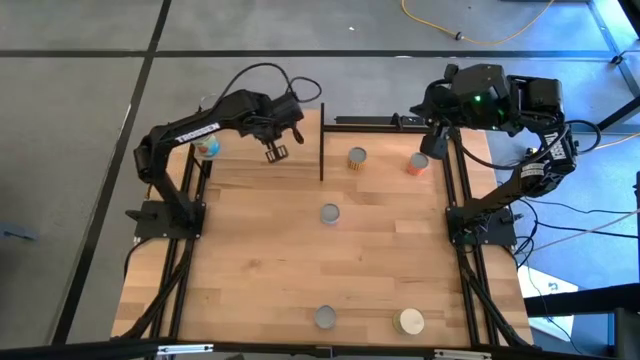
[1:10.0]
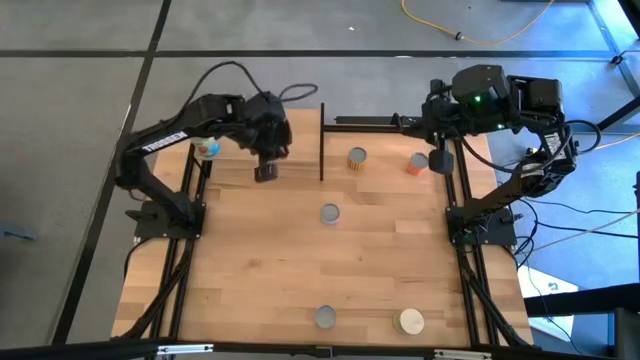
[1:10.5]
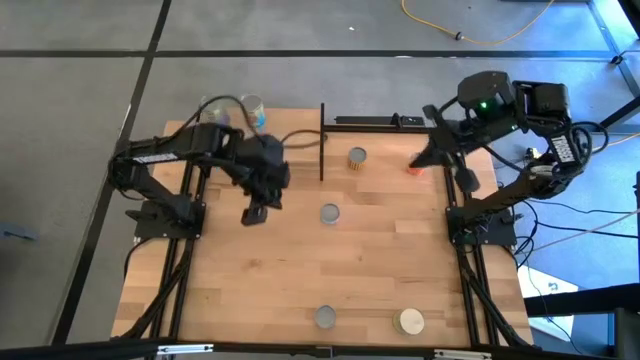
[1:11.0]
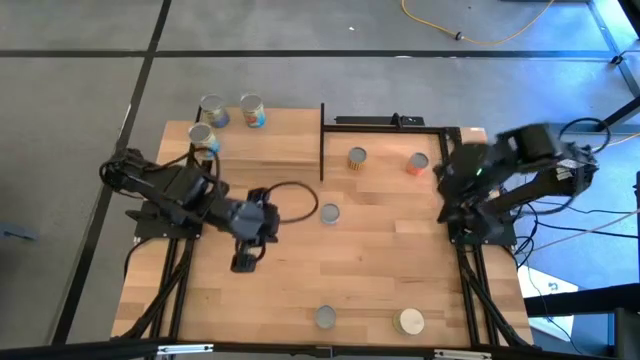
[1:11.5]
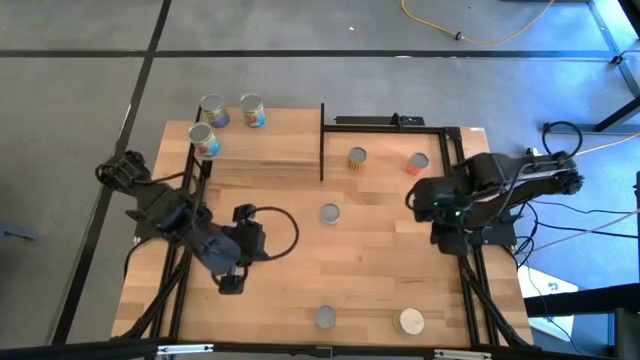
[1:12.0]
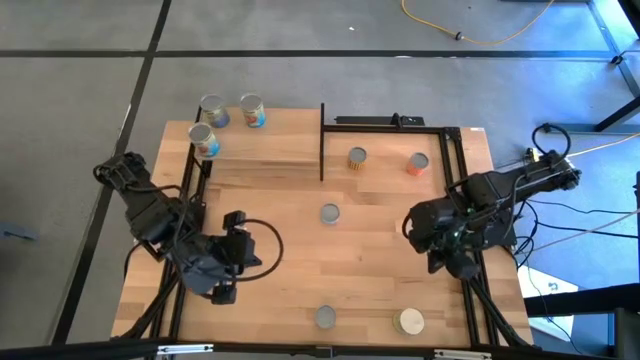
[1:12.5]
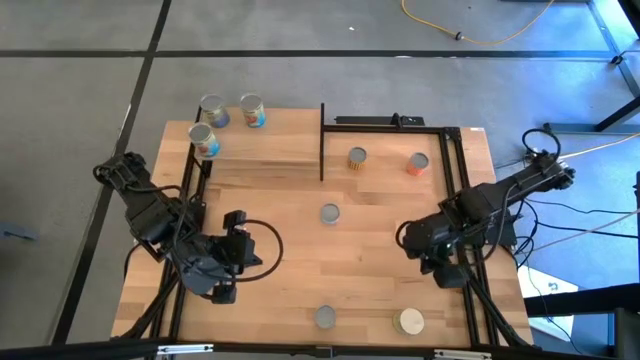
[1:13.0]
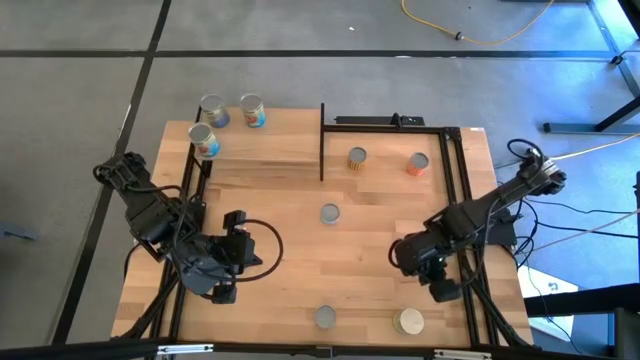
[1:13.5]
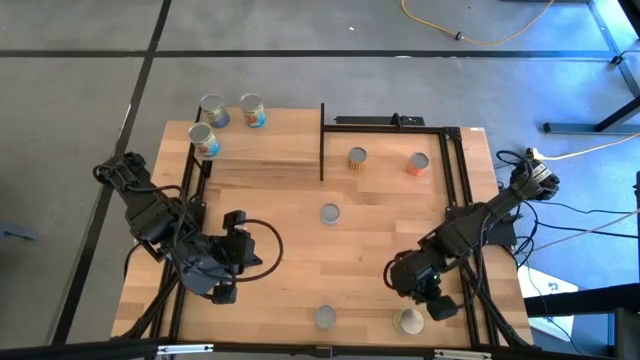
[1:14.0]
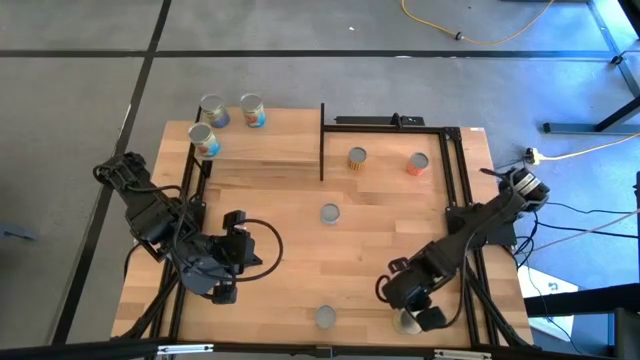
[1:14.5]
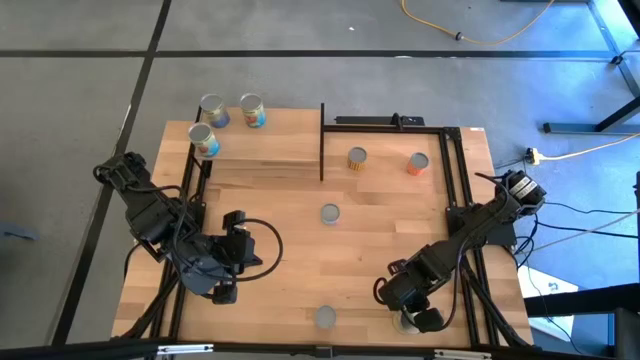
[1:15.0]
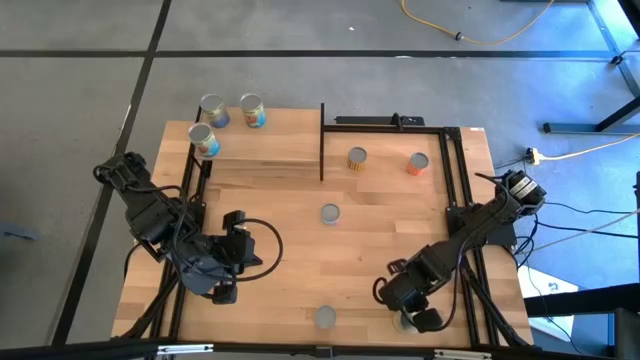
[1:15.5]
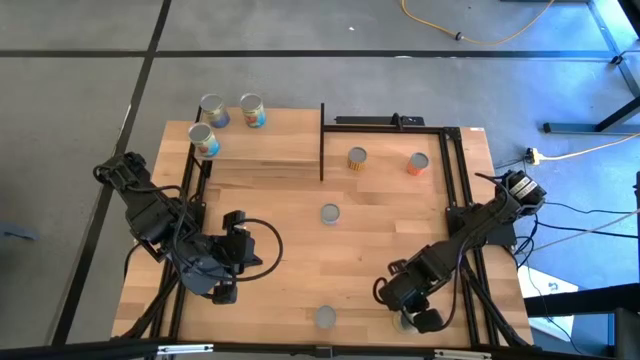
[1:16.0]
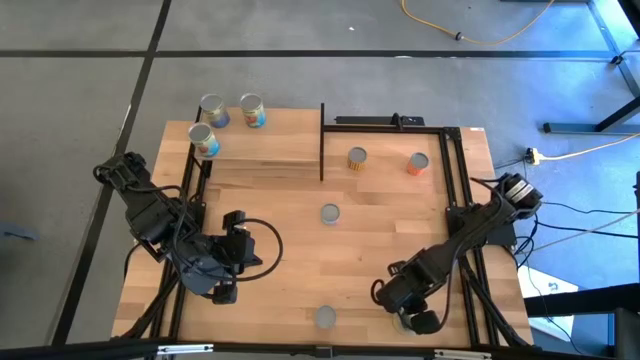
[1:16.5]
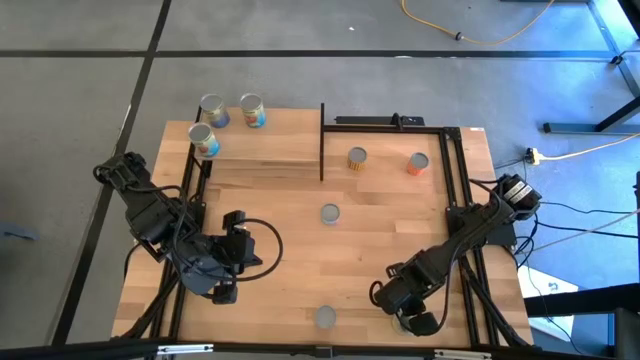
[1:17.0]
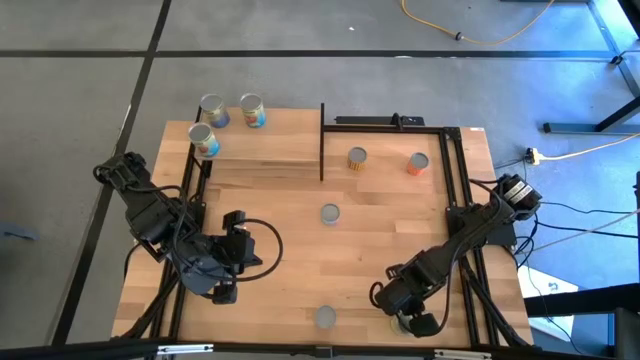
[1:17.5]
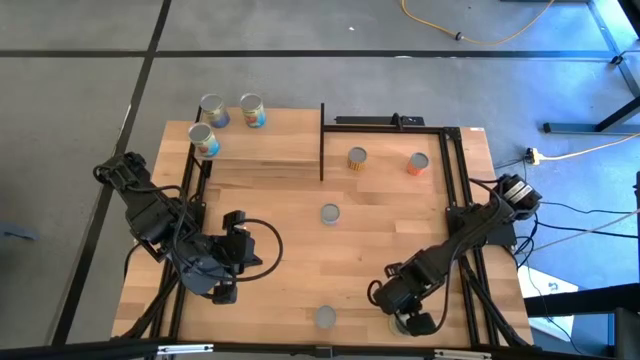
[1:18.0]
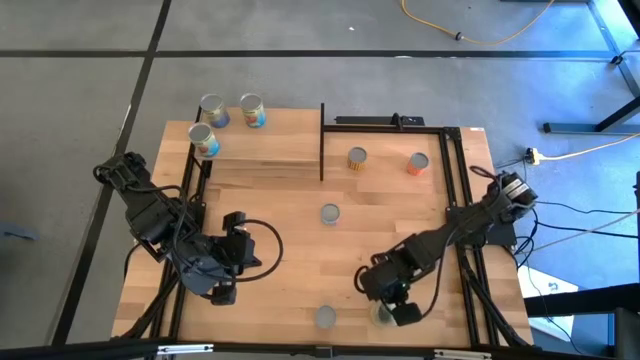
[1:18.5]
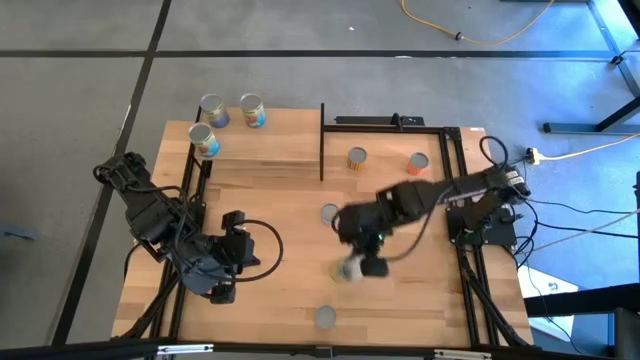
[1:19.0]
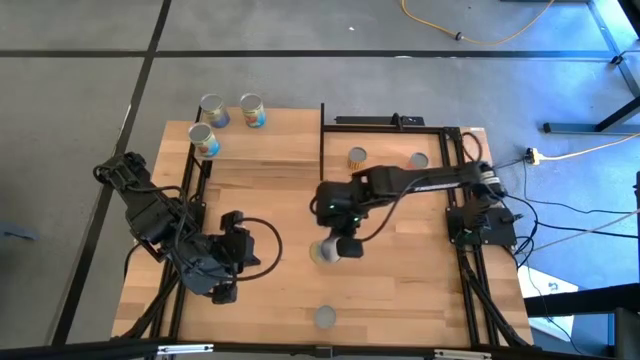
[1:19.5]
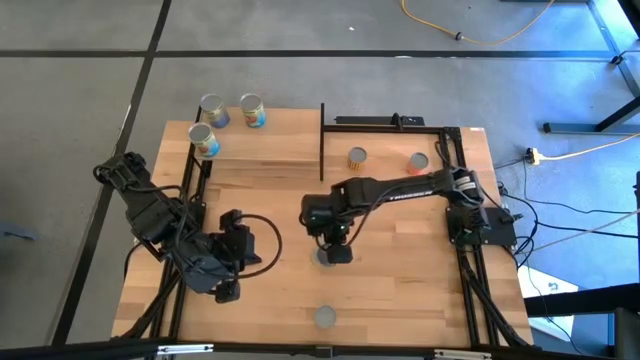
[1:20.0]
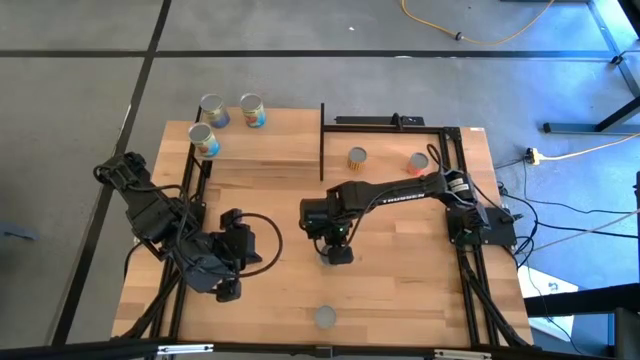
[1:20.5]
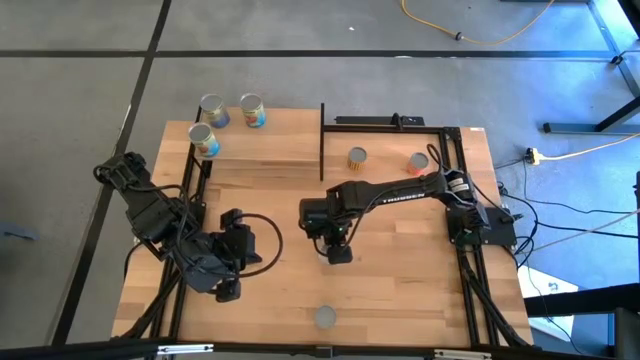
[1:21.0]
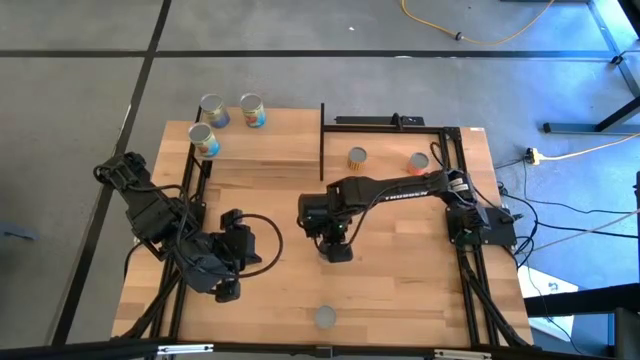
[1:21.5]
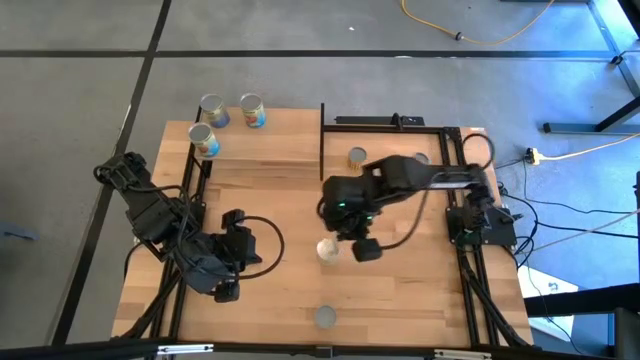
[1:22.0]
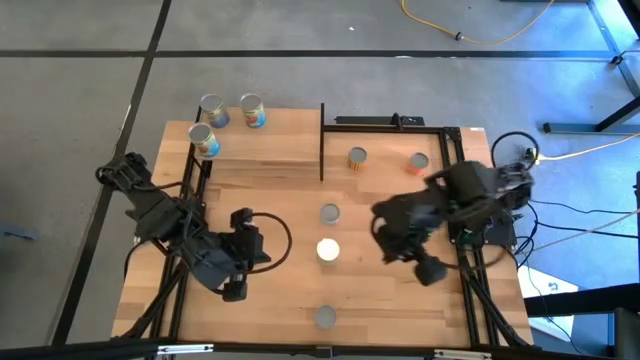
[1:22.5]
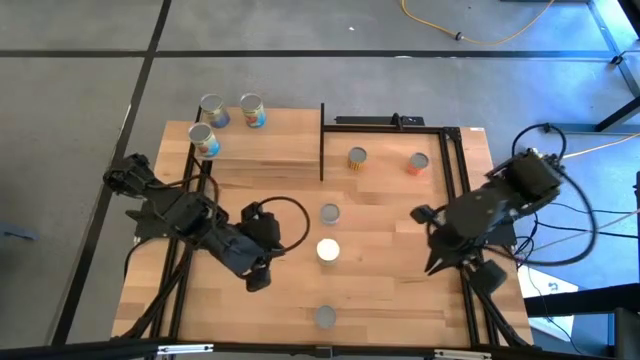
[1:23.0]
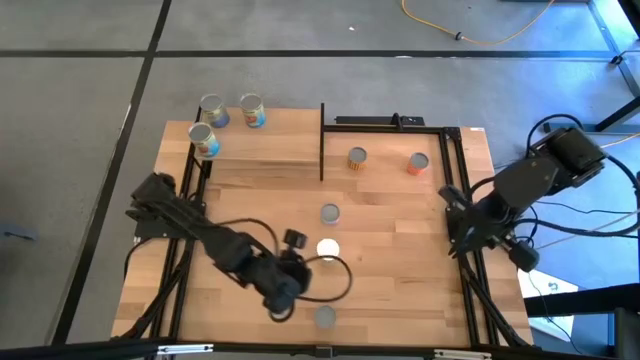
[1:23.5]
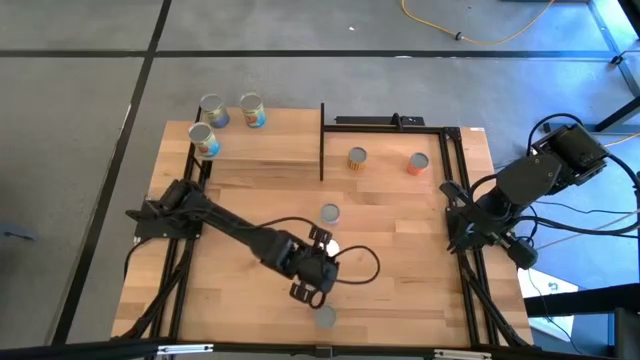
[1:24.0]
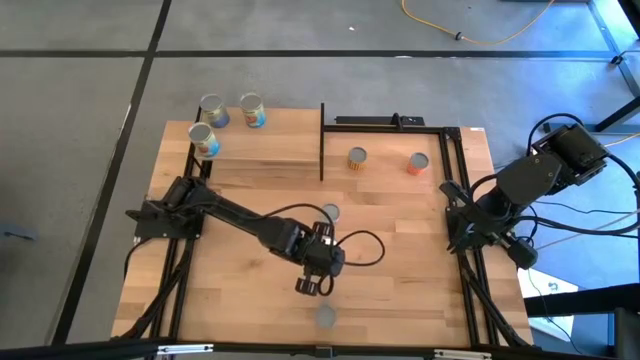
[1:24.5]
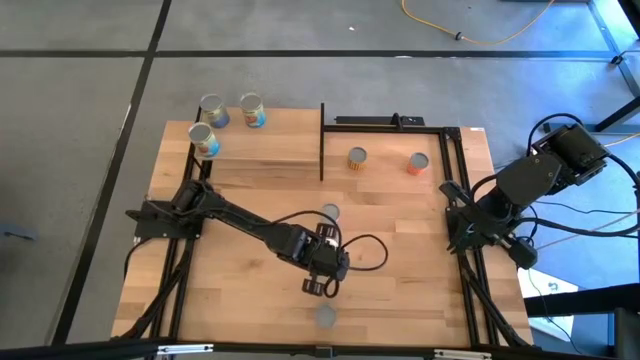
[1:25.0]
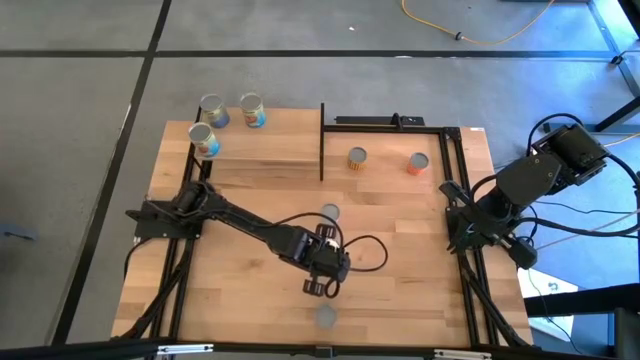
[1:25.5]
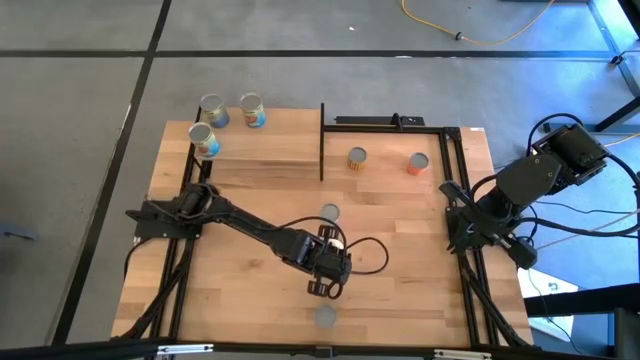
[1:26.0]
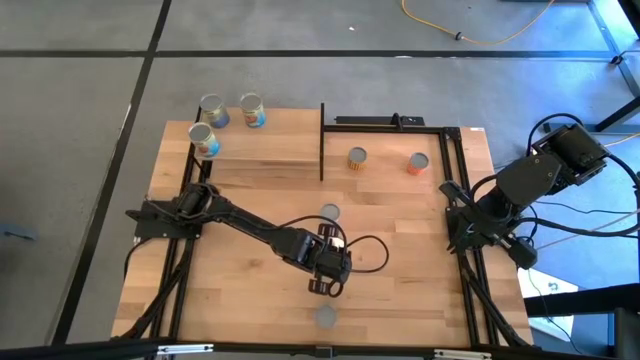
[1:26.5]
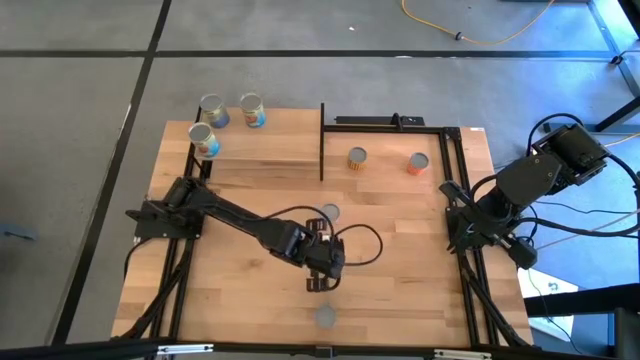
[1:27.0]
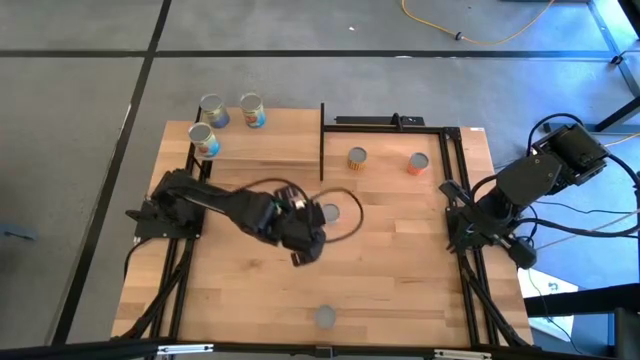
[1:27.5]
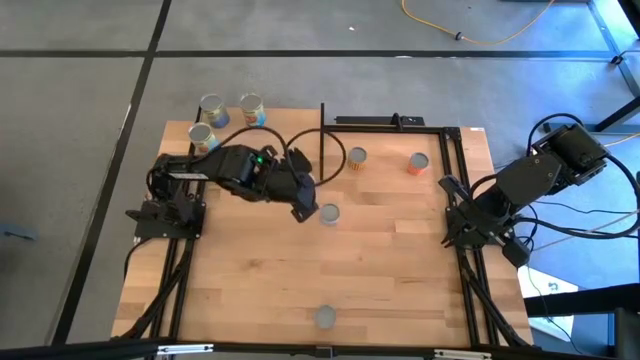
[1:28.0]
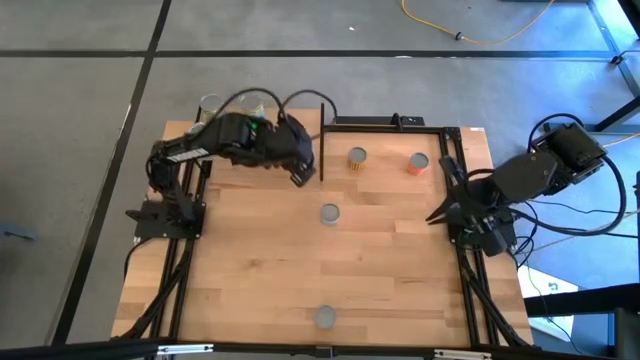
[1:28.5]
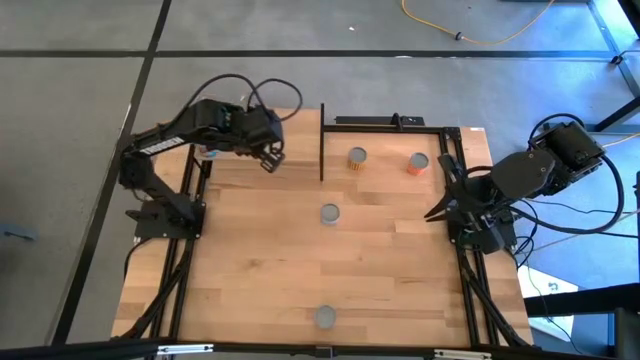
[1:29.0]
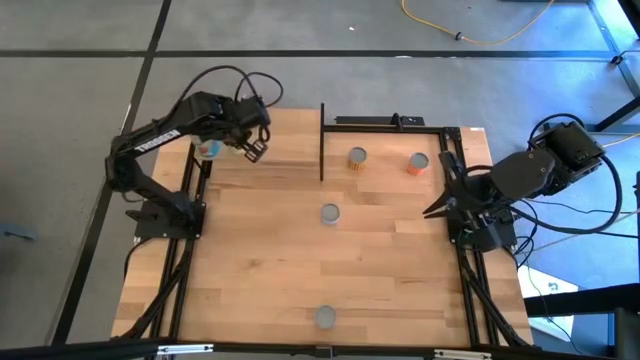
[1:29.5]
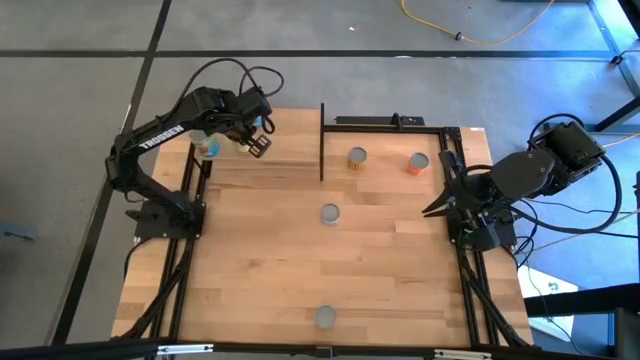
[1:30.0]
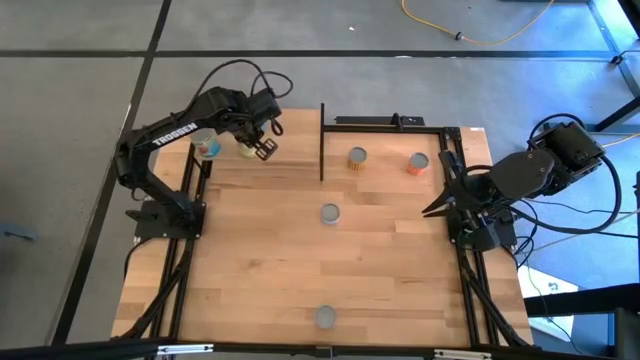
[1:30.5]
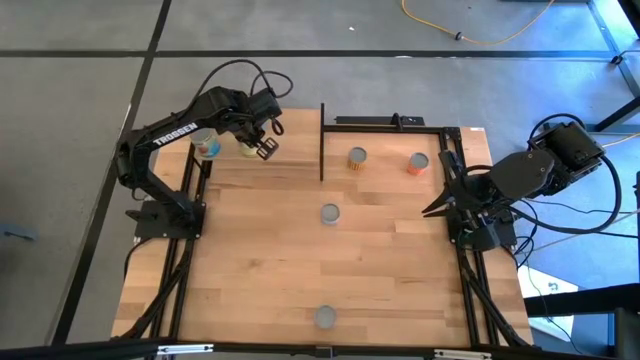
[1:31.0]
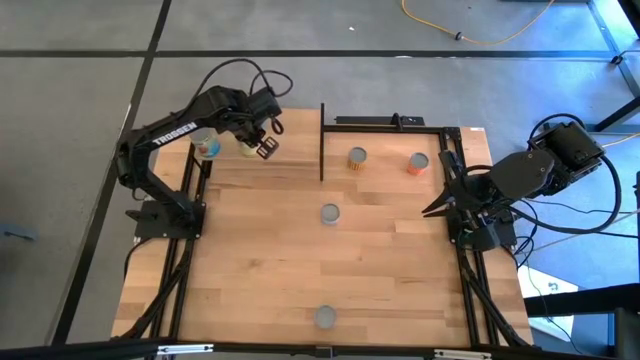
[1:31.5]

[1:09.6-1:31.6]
Task: Pick and place cans onto a shelf
Put the blue canned carrots on the shelf aligned with the other blue canned tomatoes

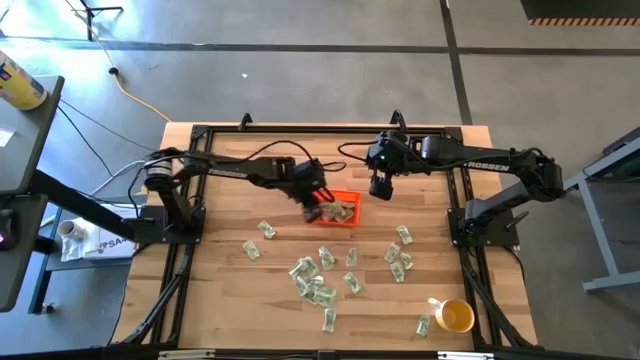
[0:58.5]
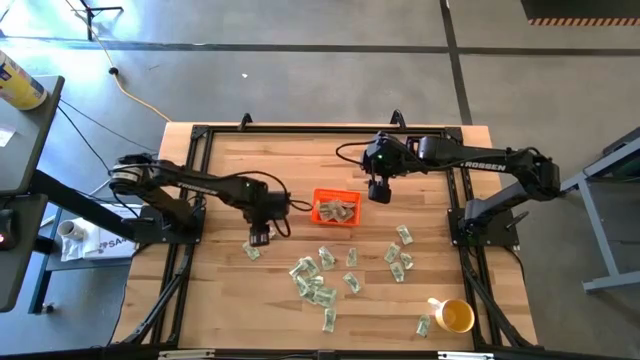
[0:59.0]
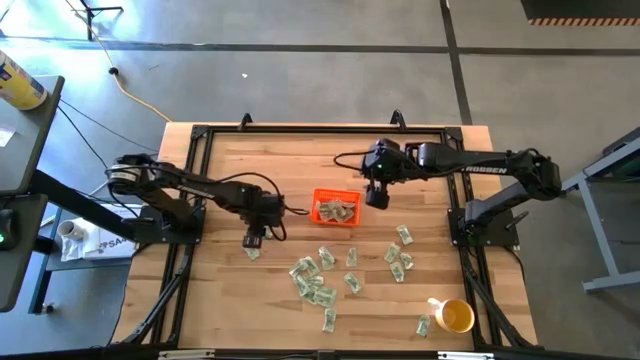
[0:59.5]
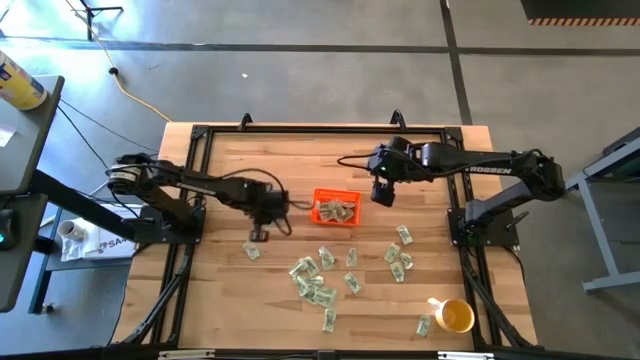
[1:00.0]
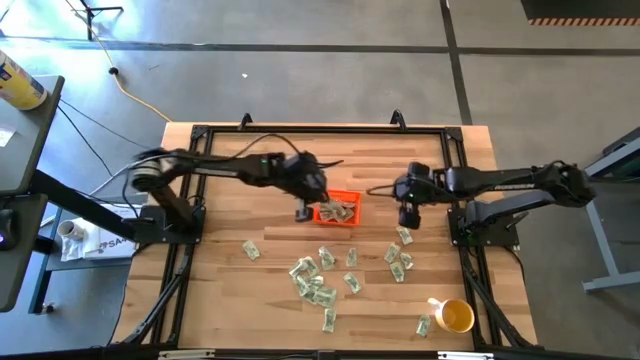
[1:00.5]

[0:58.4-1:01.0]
Task: Pick and place Stevia / Truvia into bins
Put the stevia packet into the orange bin
